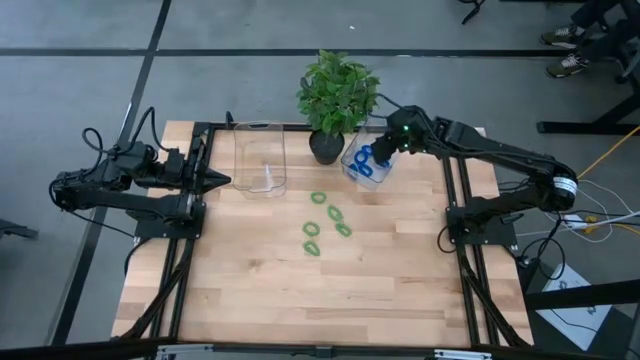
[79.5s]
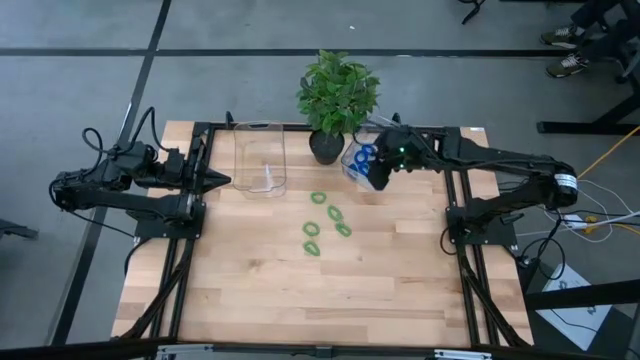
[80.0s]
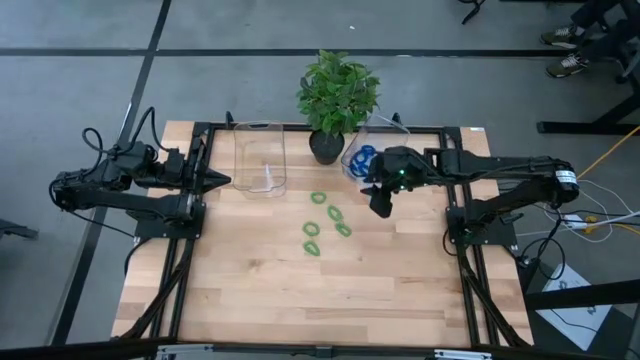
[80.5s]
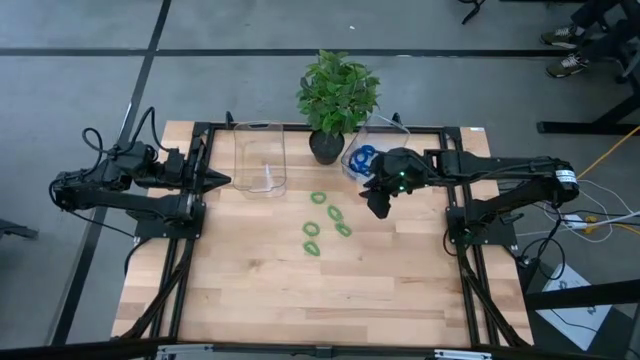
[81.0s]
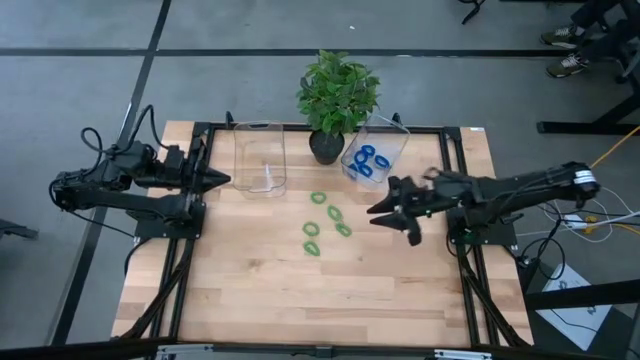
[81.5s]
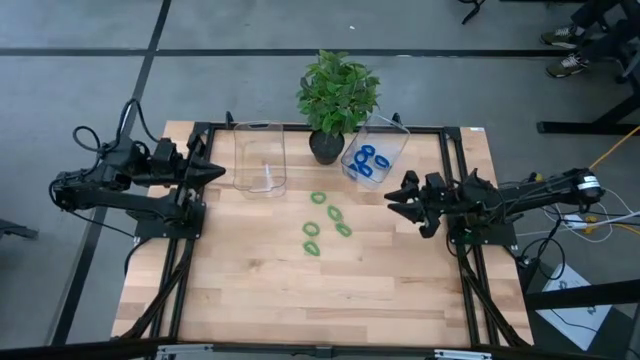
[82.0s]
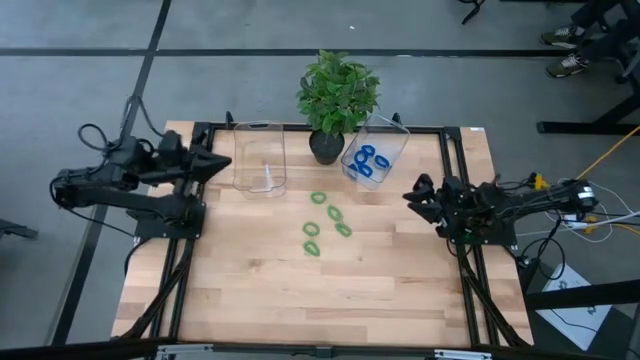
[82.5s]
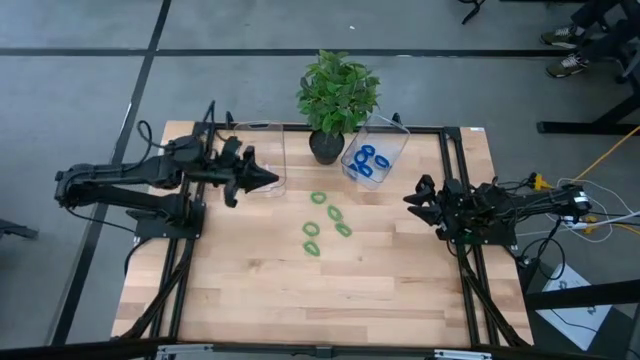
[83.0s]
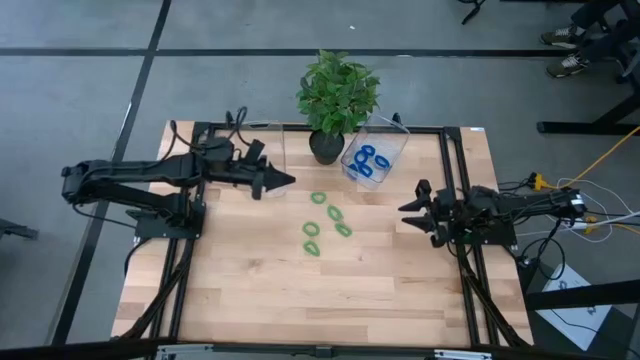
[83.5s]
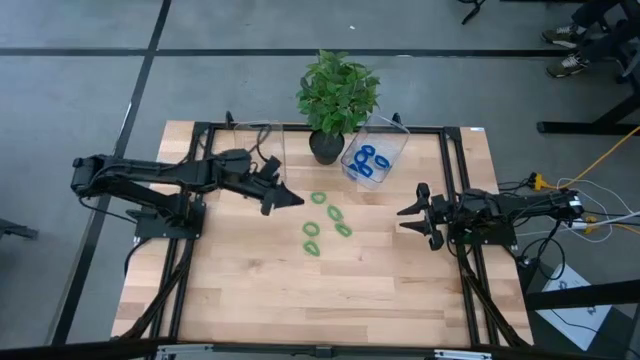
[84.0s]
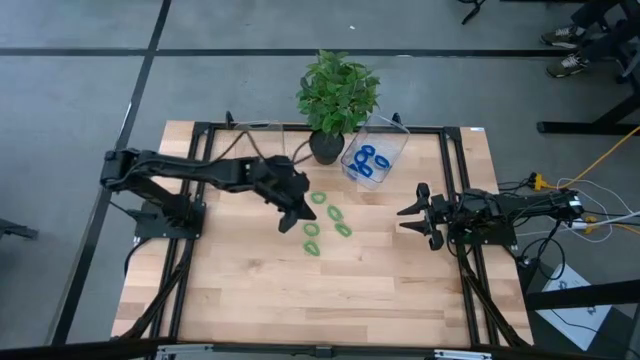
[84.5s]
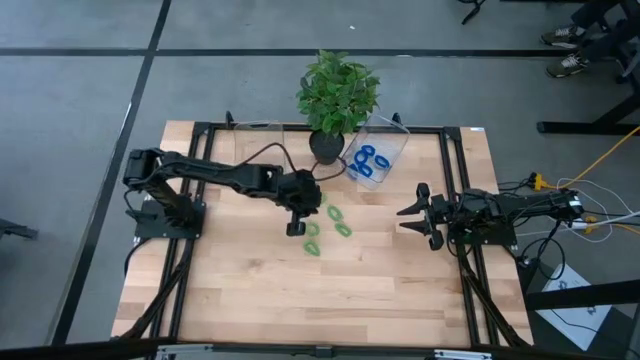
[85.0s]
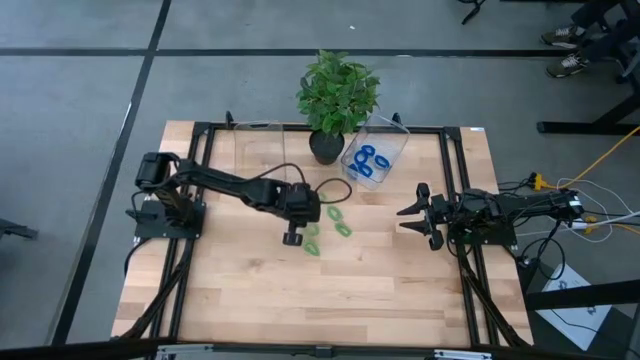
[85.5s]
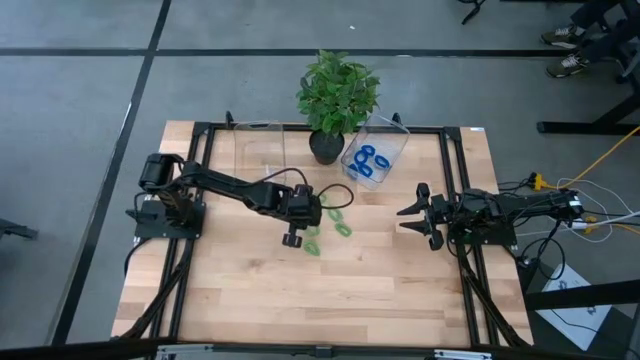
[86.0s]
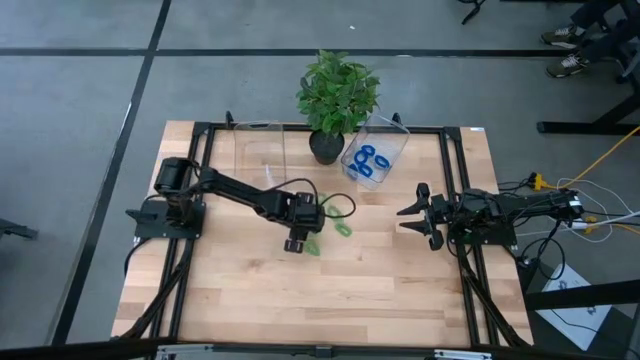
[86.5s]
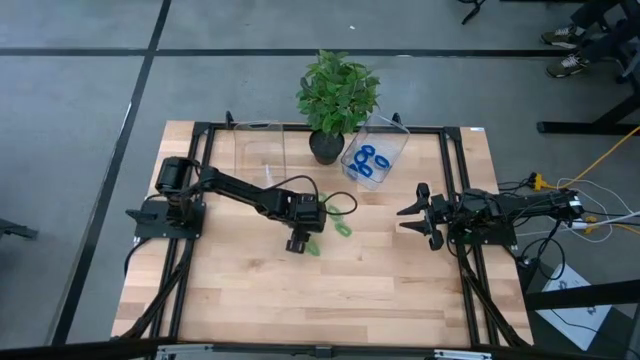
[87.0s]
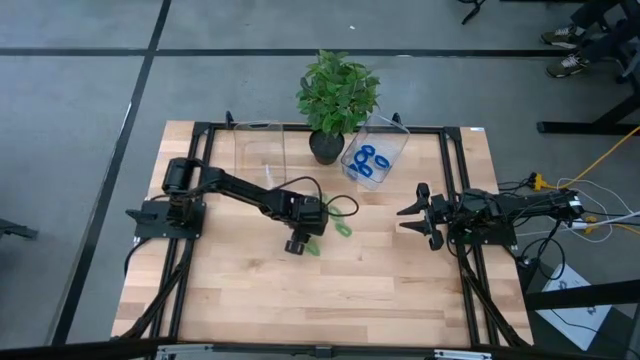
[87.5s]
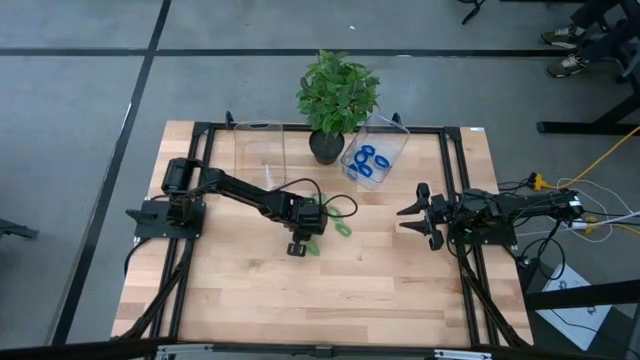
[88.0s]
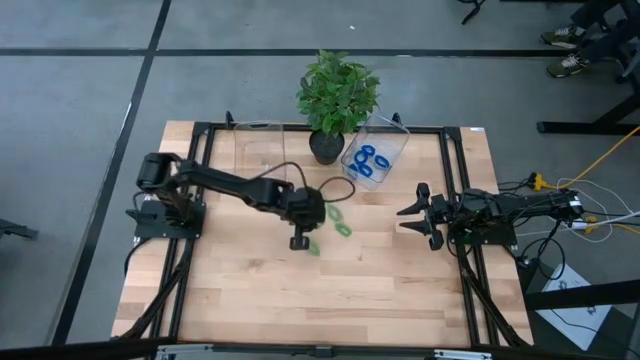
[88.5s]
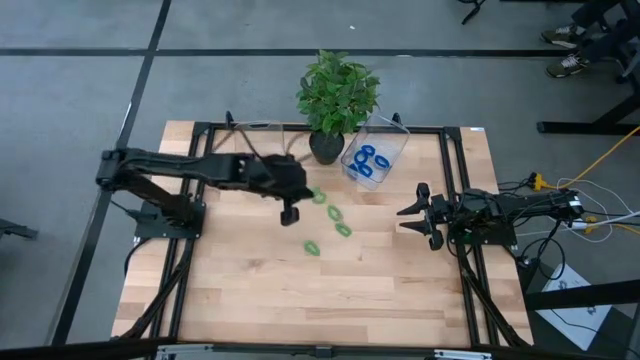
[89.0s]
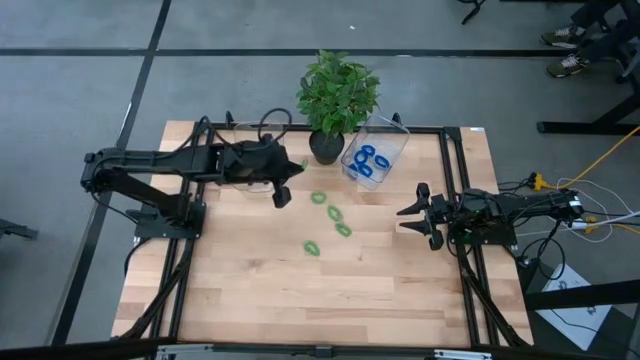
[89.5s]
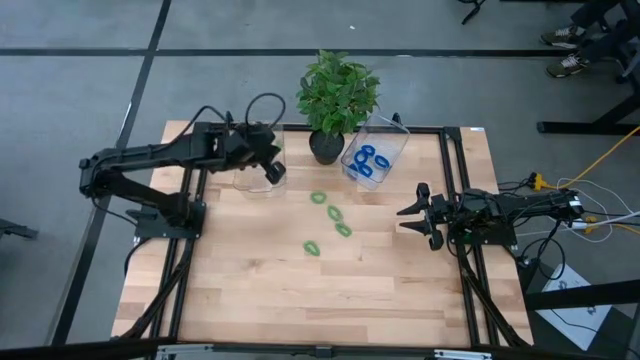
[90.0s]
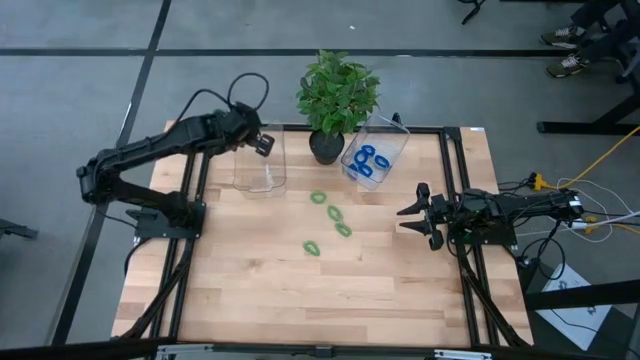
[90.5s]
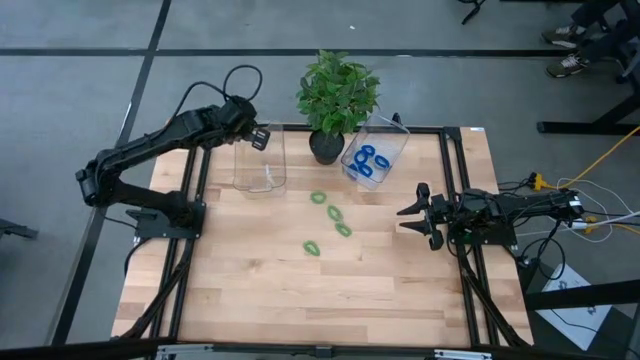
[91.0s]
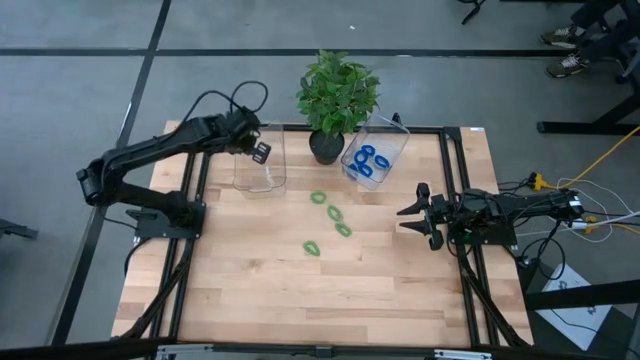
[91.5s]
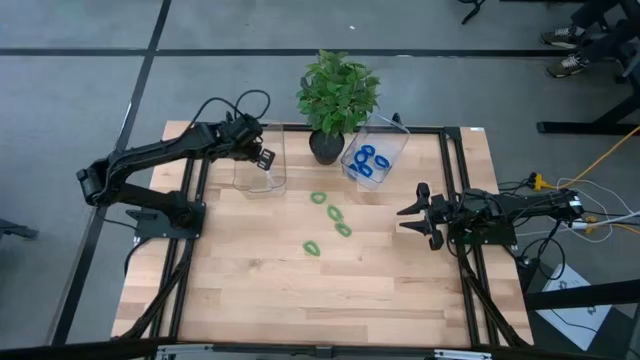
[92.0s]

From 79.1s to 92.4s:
Task: Sort spring keychains
Put the green spring keychain into the left transparent bin

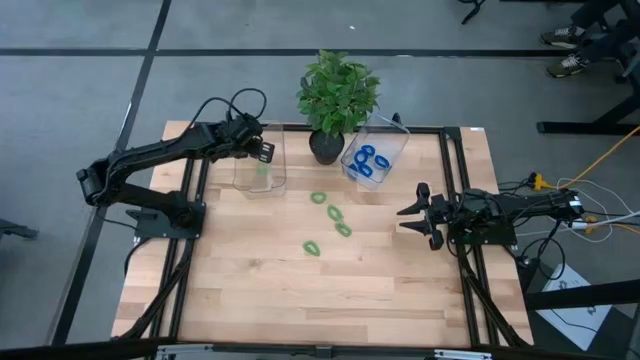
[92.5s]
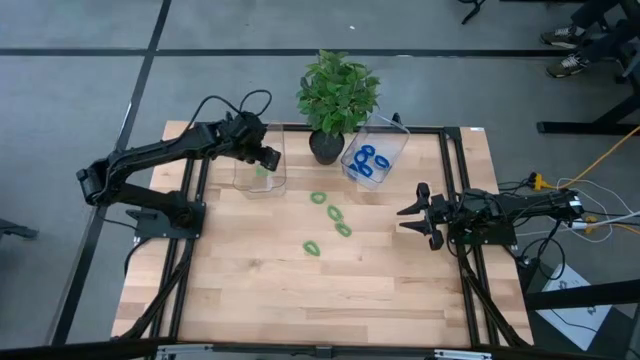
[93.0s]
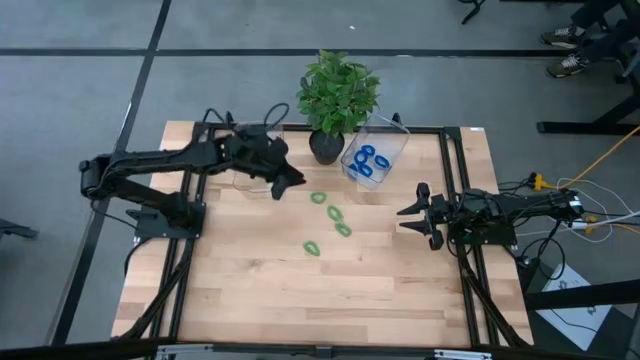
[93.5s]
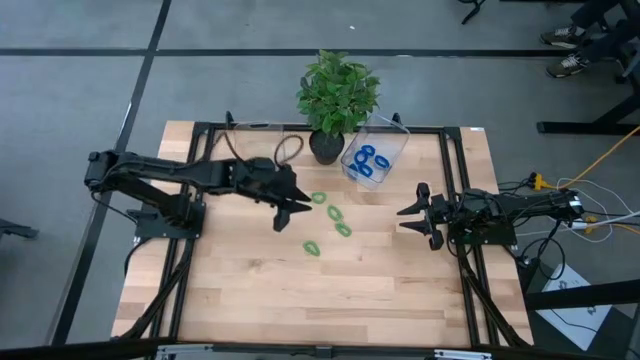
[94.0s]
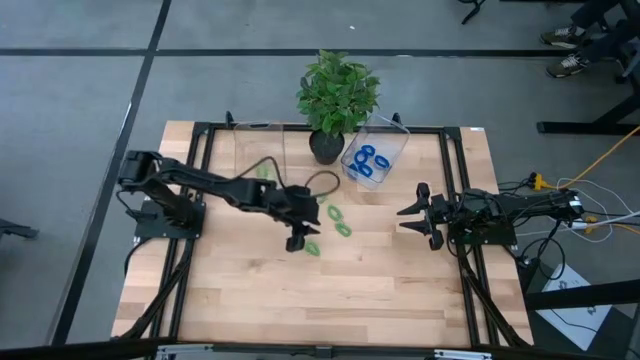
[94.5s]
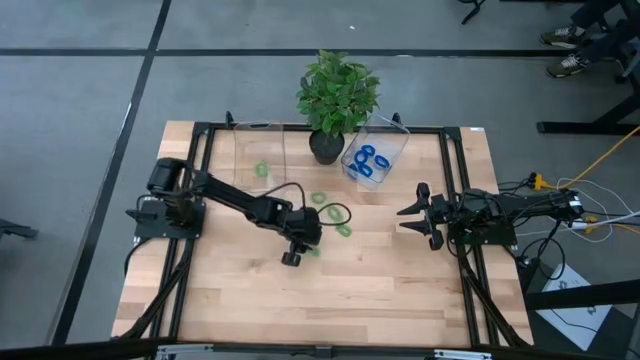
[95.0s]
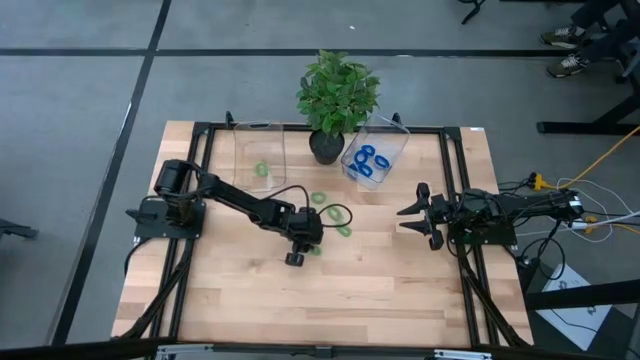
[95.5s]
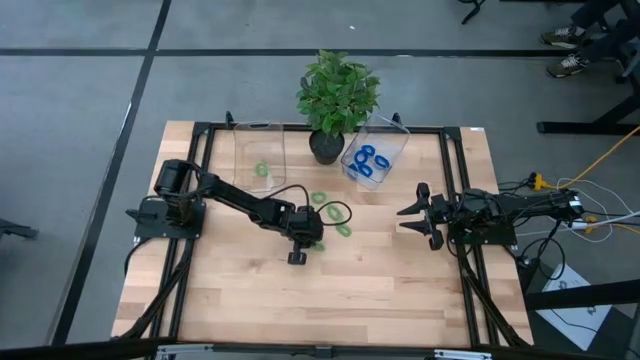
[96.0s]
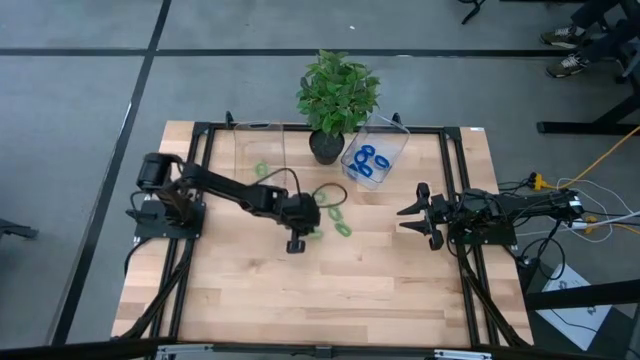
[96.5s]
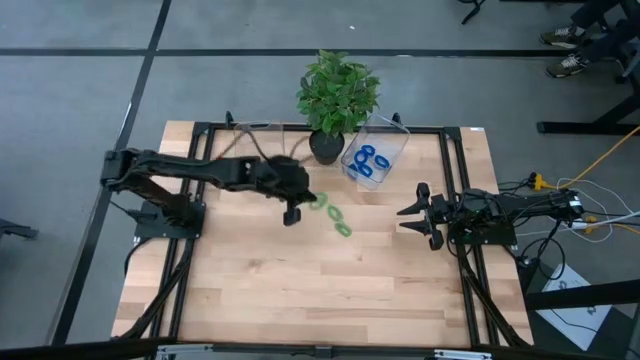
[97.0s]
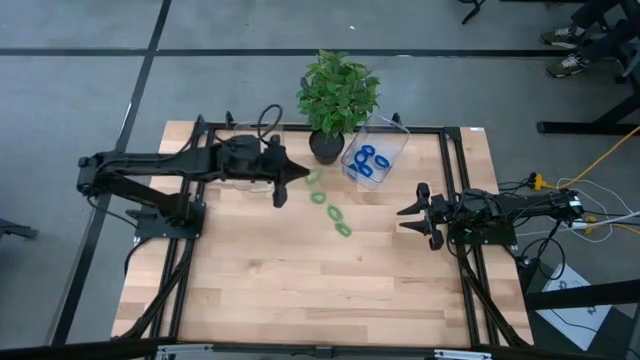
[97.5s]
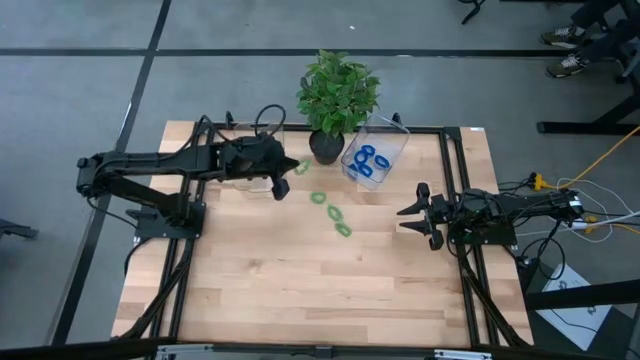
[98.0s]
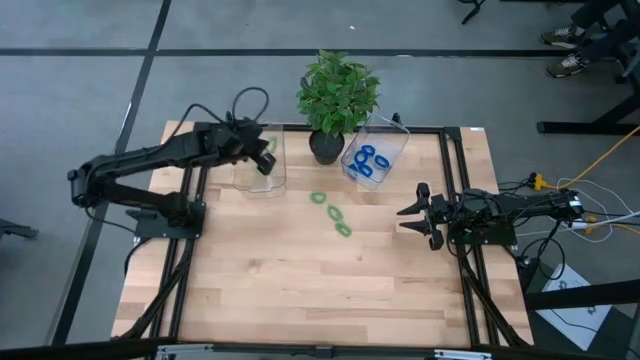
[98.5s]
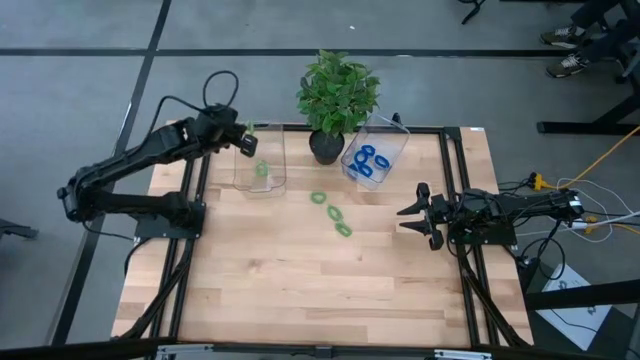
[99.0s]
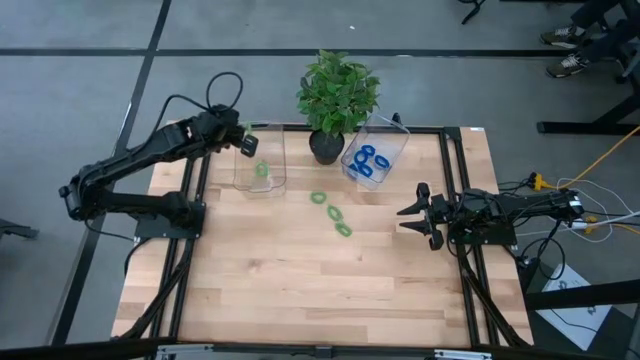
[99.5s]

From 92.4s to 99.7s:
Put the green spring keychain into the left transparent bin

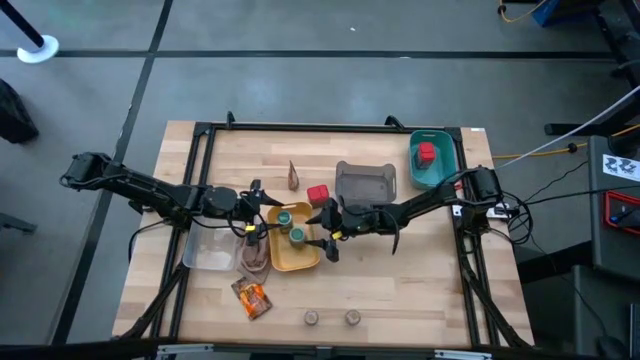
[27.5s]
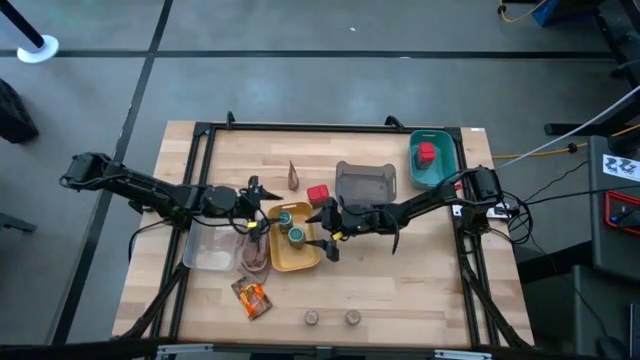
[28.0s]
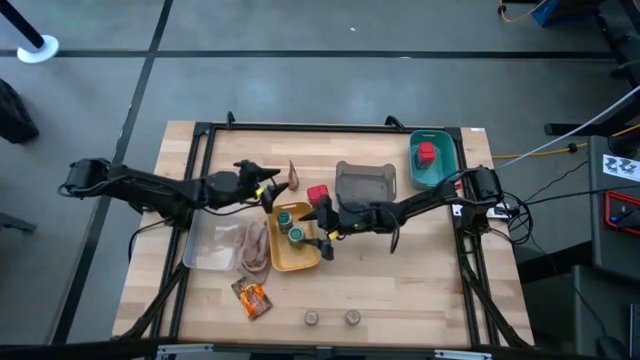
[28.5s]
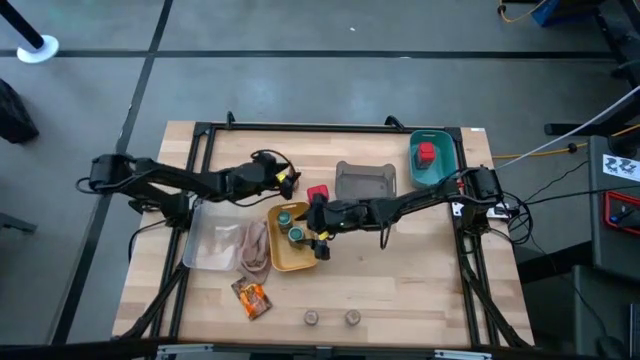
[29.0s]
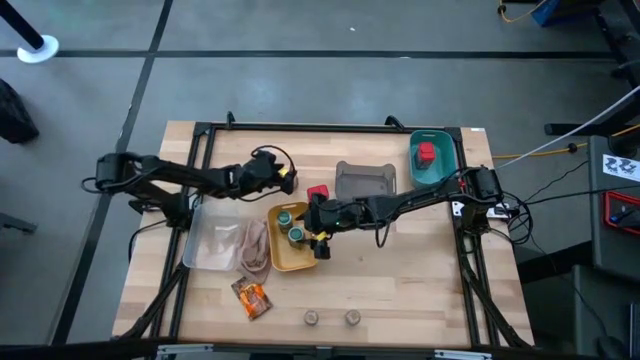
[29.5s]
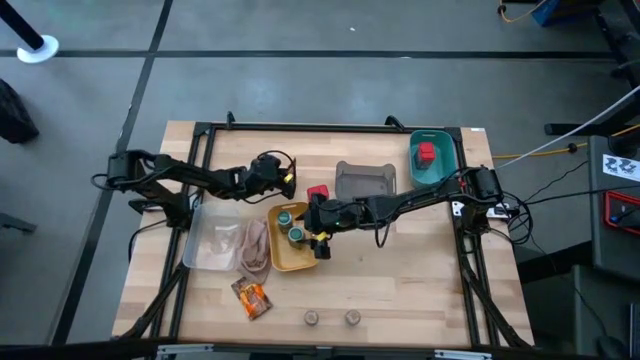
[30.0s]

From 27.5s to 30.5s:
Task: Sort spices by type
Put the top seasoning bag into the transparent bin
